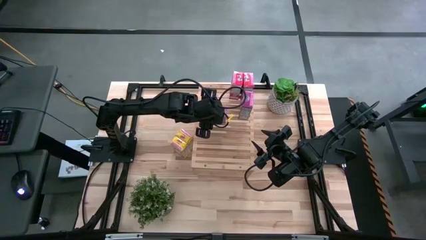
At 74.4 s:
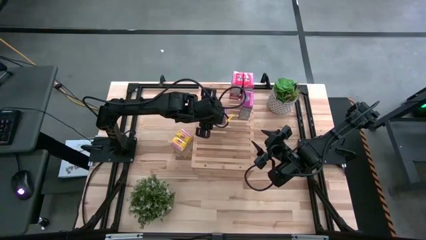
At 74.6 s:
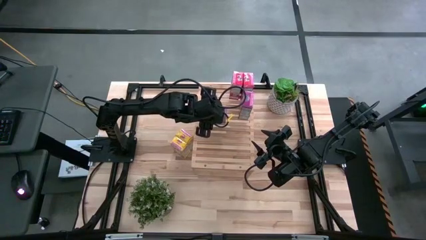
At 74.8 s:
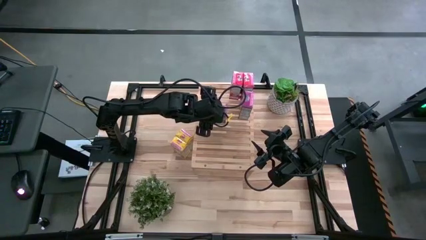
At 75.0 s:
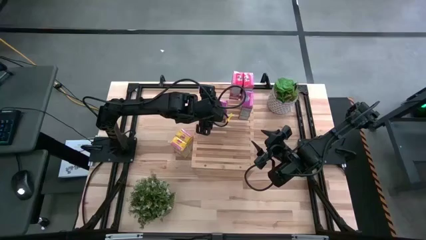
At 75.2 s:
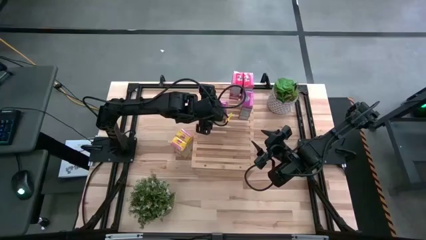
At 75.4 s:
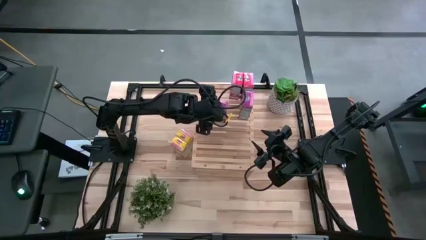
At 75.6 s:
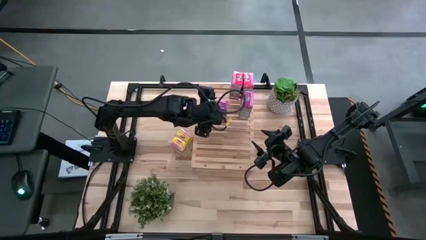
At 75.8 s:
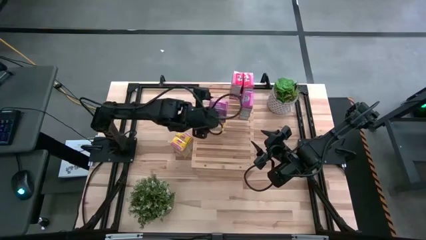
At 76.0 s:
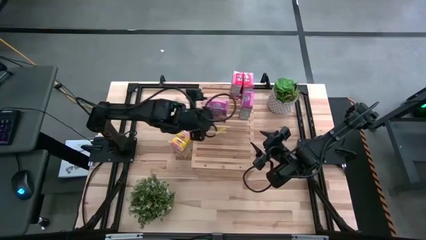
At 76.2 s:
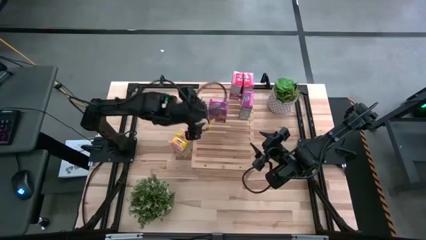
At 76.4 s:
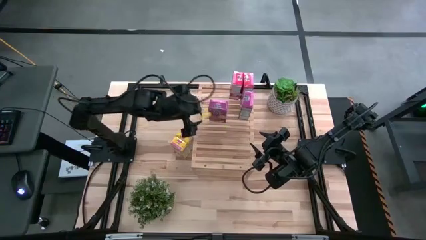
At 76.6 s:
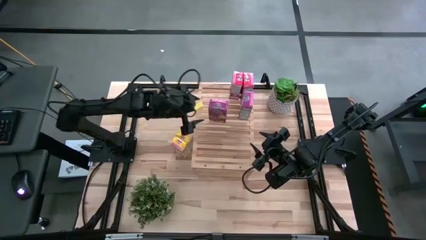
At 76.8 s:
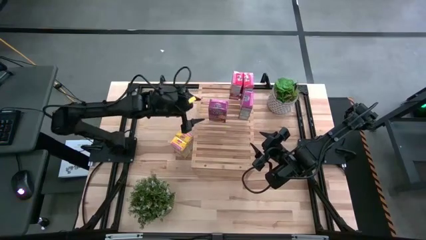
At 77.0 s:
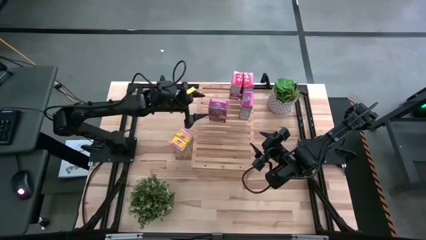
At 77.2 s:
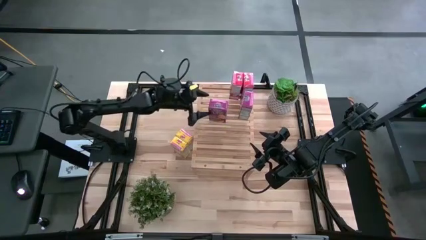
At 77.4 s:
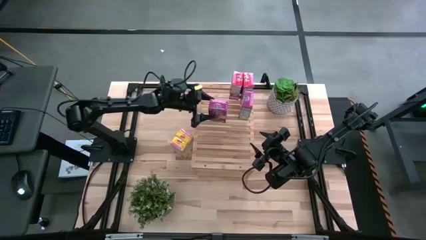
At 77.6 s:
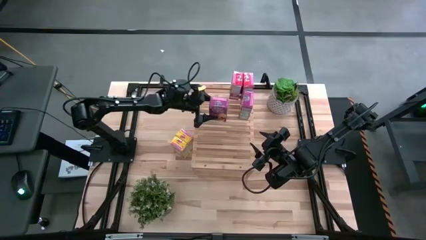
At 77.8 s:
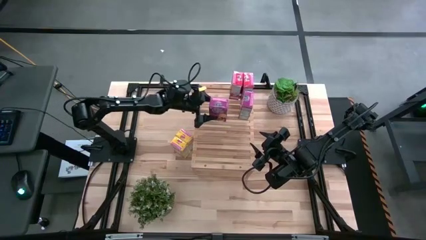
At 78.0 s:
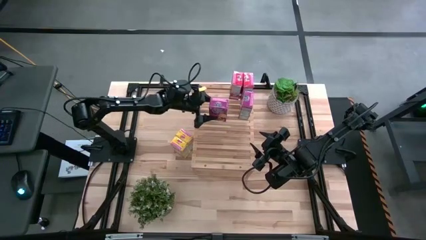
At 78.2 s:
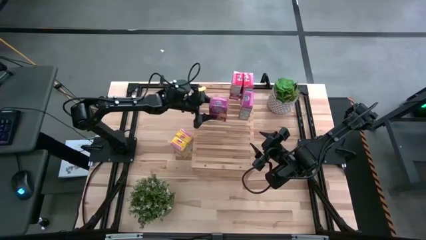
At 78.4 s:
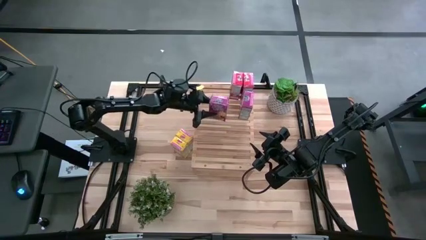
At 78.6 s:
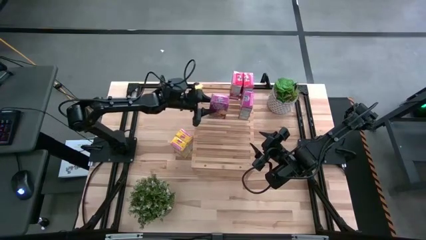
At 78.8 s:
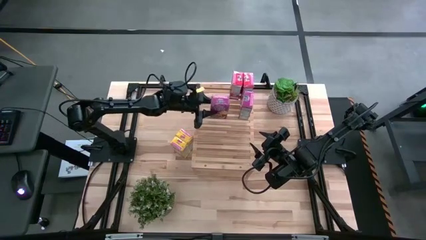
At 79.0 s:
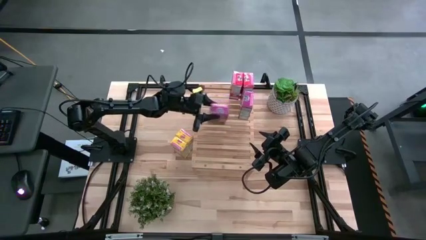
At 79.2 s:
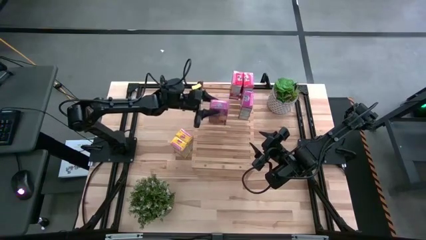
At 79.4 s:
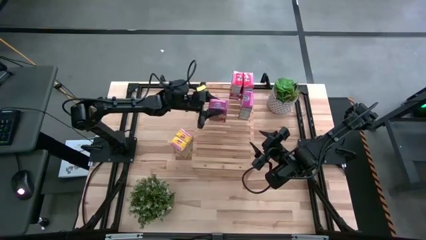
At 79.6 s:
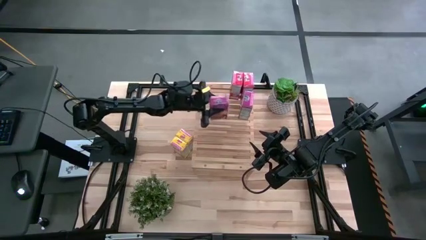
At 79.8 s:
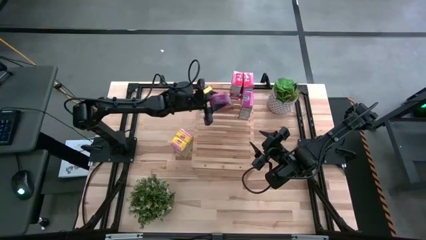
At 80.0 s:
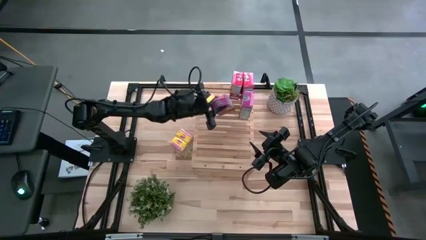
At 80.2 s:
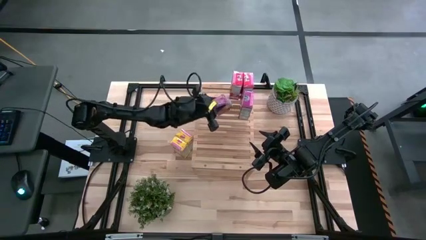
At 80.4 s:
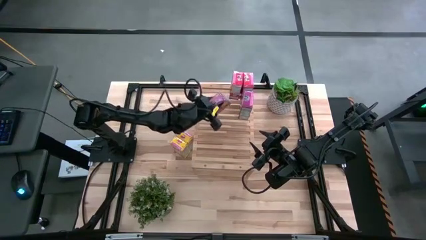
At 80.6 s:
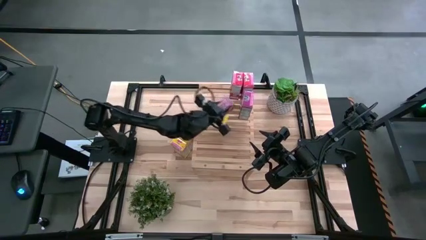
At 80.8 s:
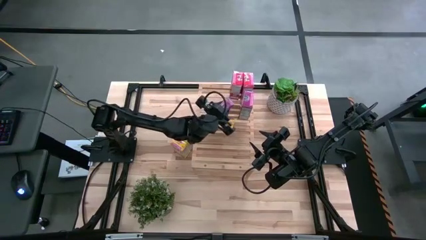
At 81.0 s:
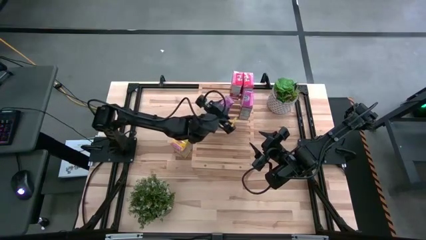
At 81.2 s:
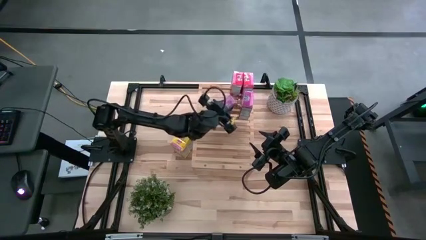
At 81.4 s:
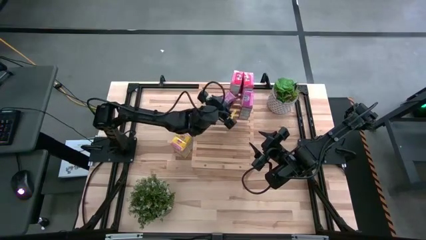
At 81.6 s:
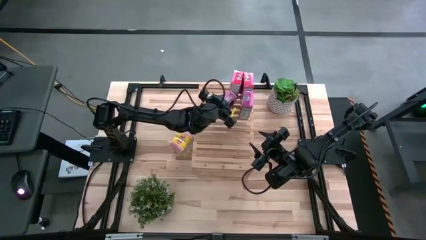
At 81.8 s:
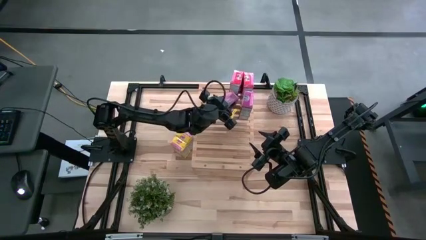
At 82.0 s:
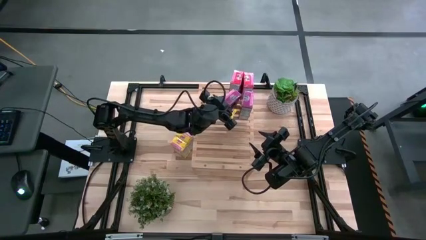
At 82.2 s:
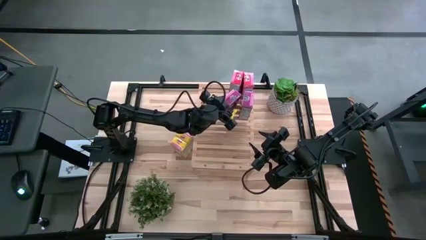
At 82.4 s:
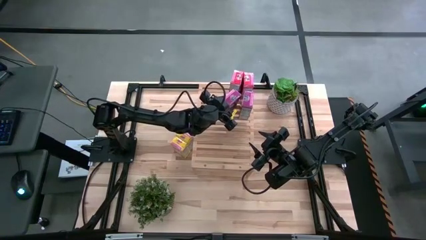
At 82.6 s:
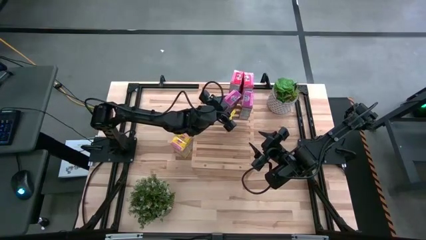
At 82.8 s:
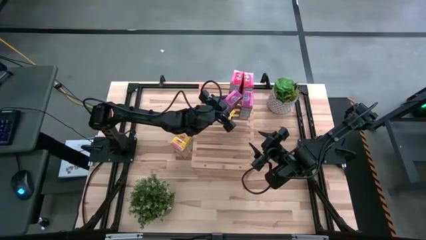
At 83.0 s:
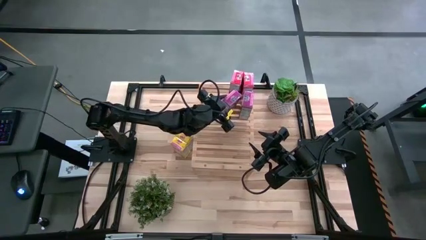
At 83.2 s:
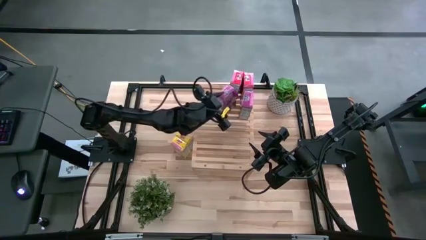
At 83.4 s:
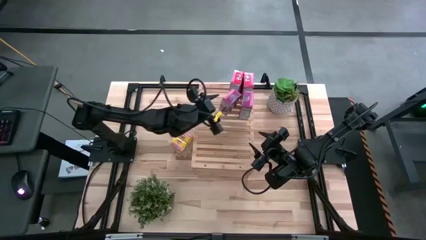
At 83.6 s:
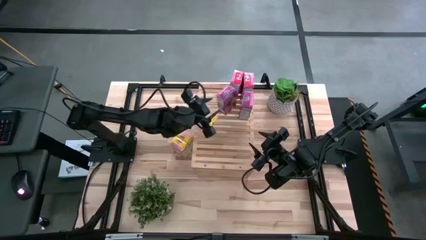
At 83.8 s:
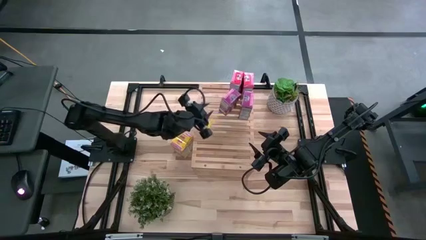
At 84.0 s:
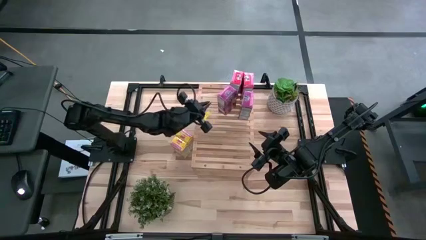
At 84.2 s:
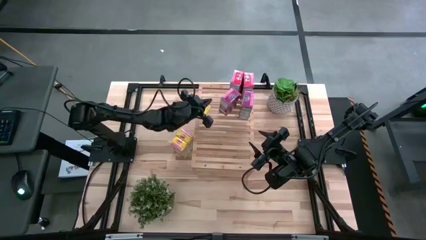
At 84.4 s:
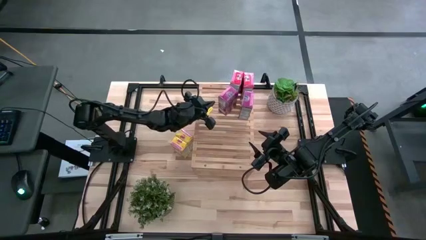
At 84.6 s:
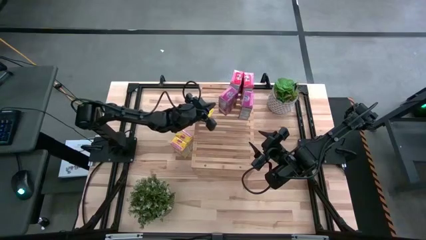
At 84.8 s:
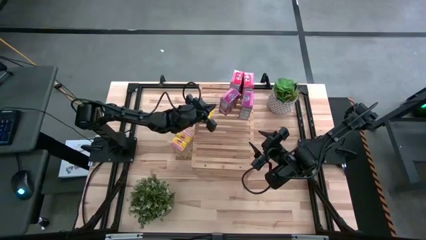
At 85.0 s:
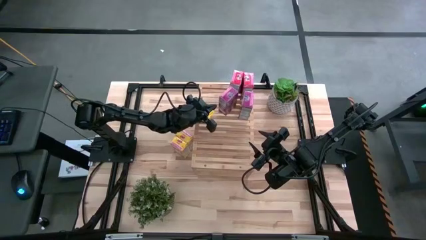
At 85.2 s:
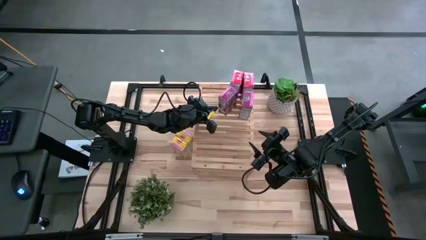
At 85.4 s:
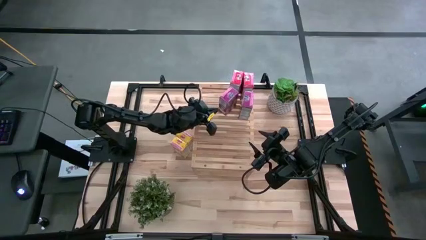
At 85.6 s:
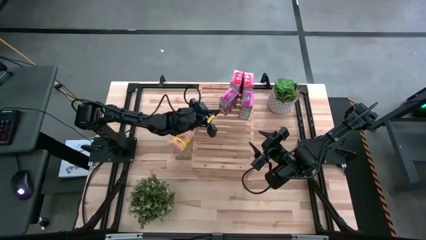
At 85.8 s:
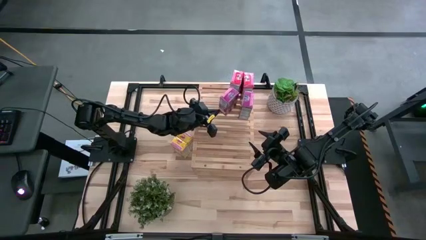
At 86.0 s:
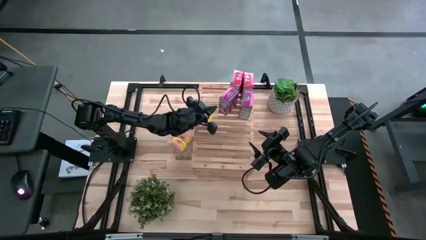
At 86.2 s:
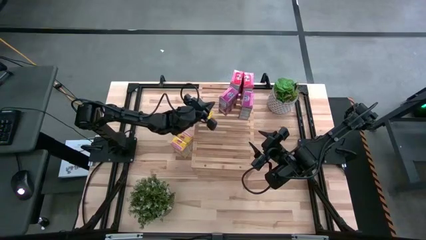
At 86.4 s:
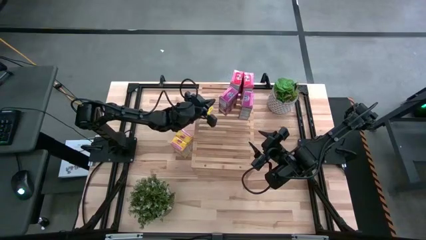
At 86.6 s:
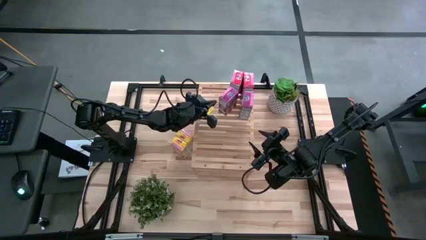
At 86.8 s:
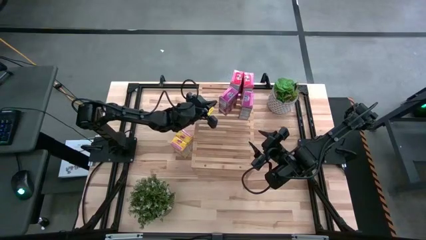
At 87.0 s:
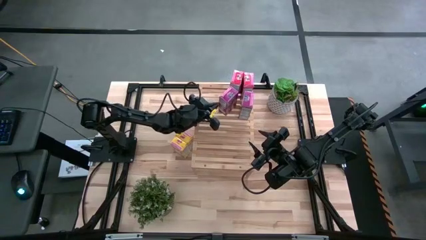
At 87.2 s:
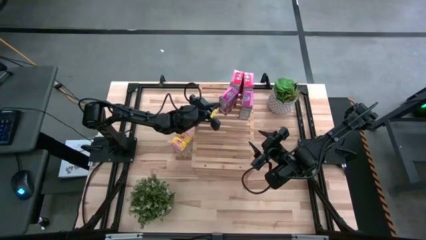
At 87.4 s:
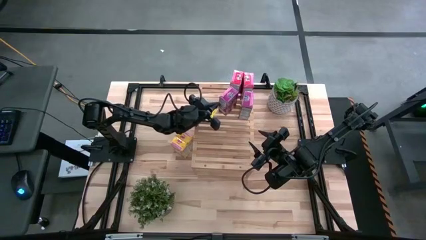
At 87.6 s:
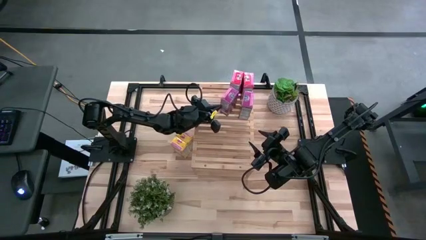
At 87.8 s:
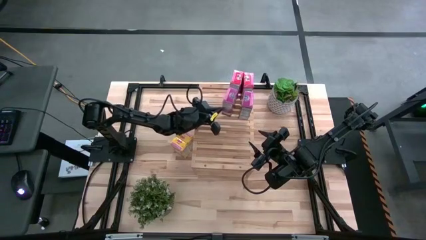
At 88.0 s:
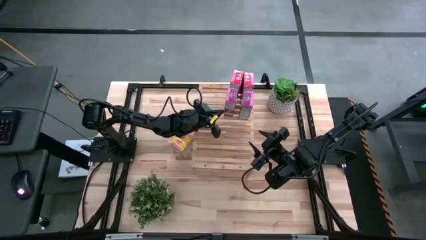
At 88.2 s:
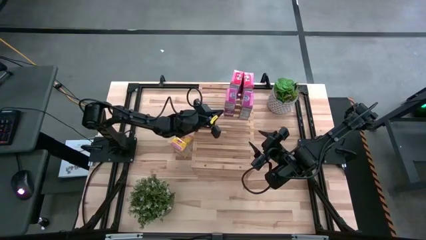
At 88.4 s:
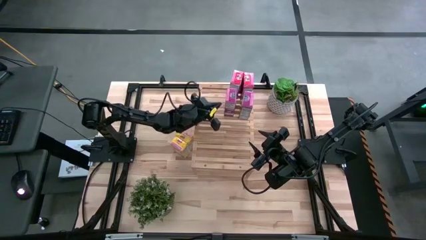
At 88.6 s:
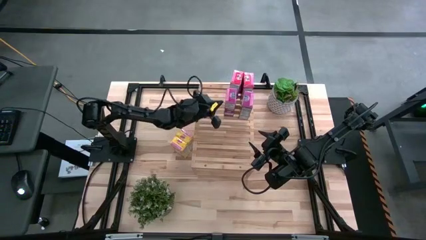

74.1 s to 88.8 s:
Task: Stack cereal on shelf
Put the purple cereal box on the shelf aligned with the other purple cereal box

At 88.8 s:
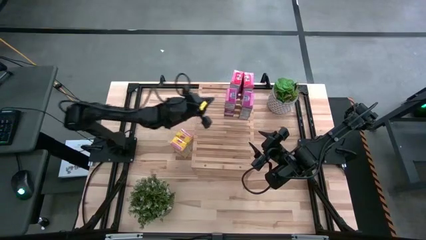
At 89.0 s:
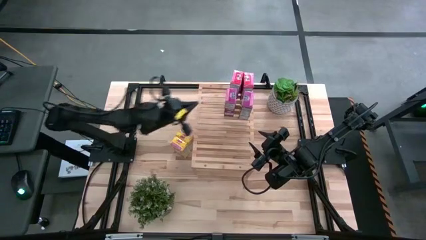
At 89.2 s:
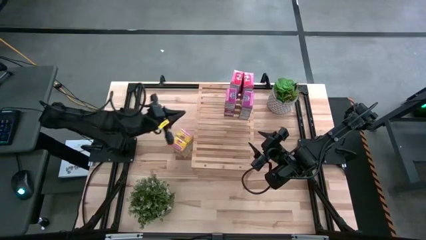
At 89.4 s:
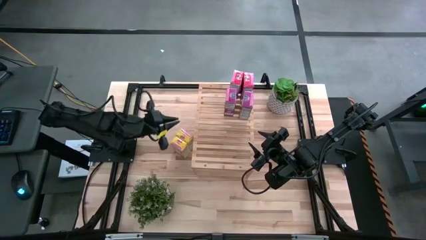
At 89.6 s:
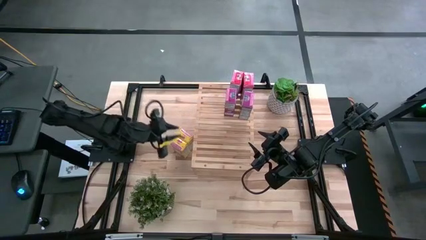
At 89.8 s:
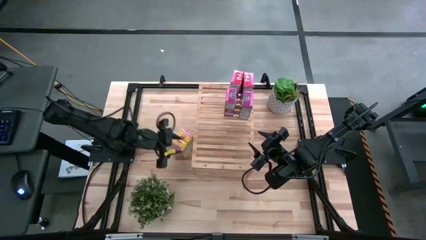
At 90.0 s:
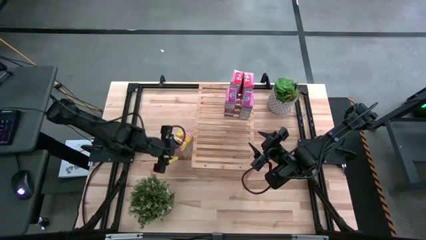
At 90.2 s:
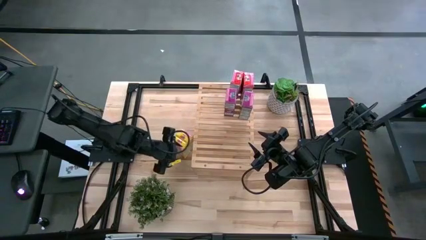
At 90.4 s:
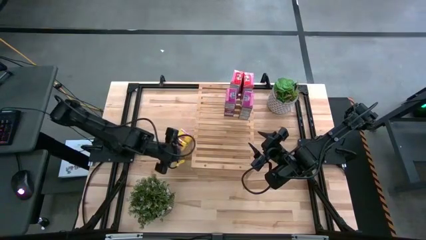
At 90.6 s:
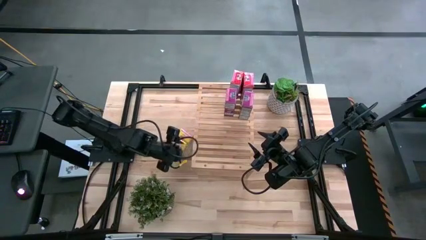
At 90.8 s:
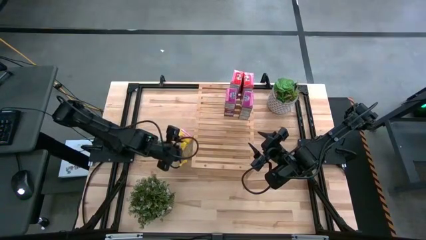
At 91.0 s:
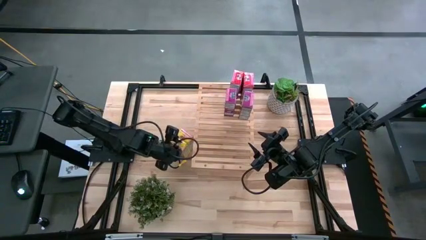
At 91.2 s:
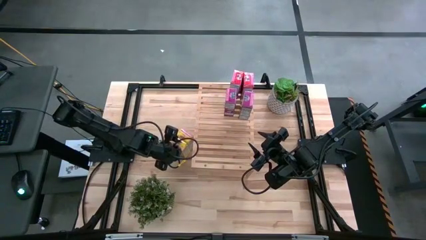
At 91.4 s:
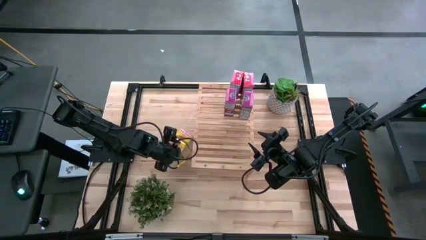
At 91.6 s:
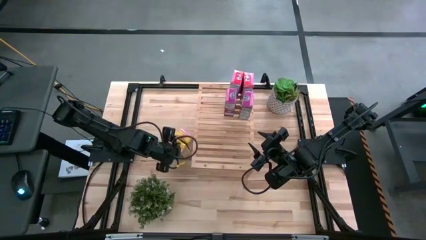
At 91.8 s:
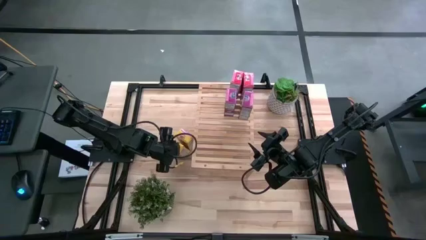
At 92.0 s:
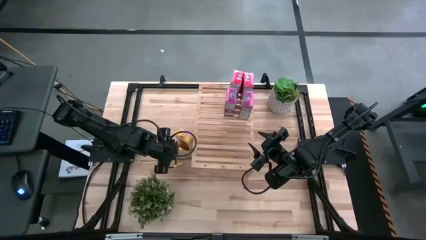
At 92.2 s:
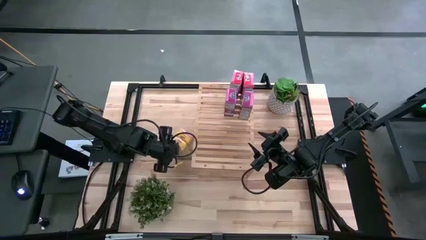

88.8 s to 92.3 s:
Put the bottom yellow cereal box on the shelf
